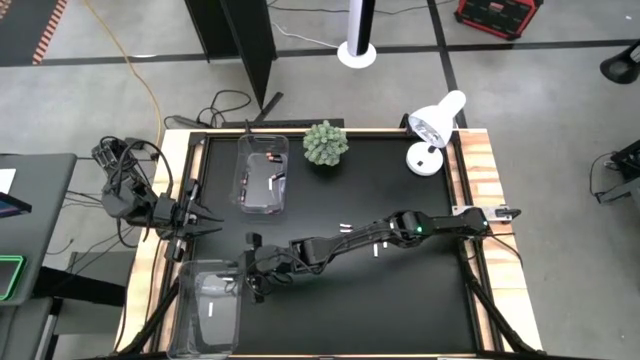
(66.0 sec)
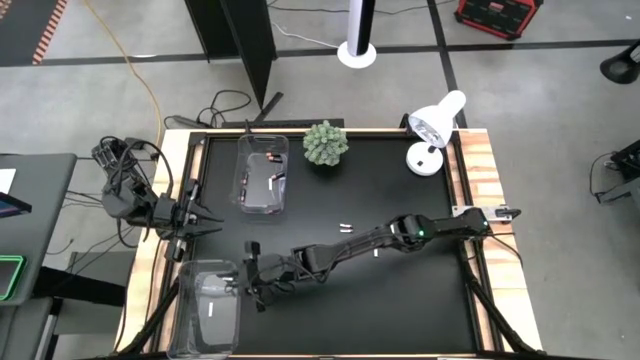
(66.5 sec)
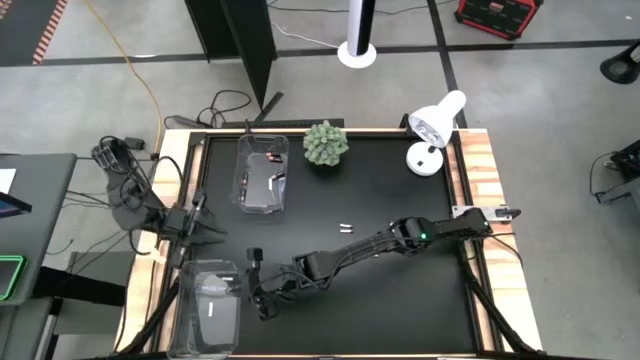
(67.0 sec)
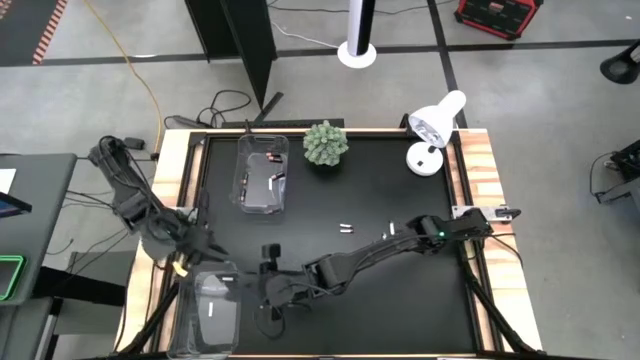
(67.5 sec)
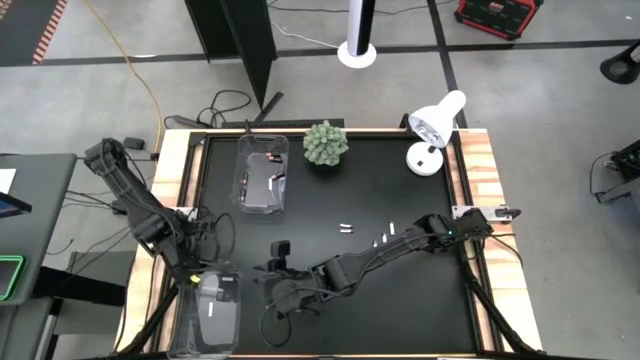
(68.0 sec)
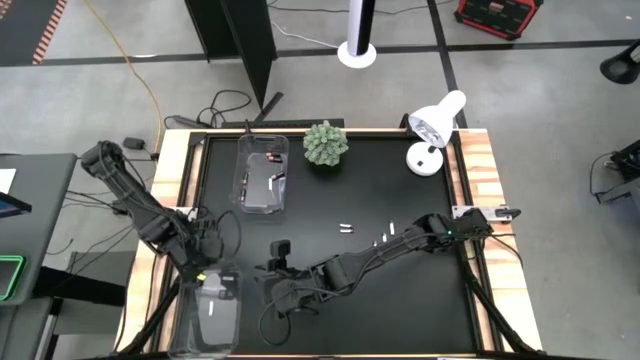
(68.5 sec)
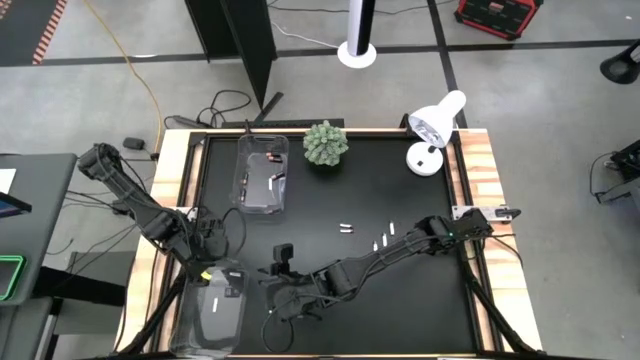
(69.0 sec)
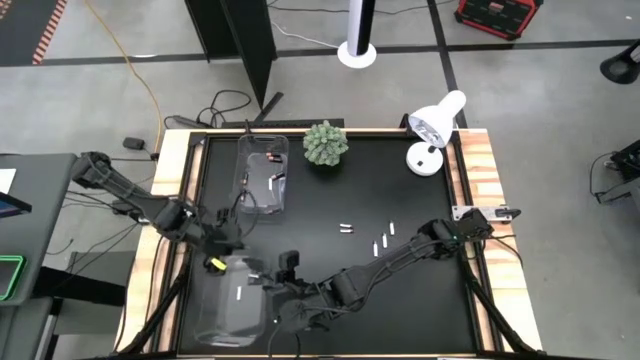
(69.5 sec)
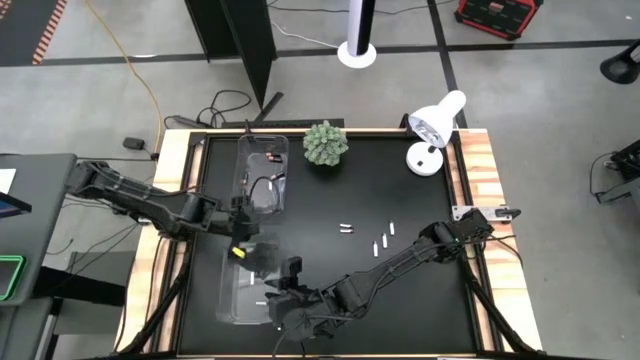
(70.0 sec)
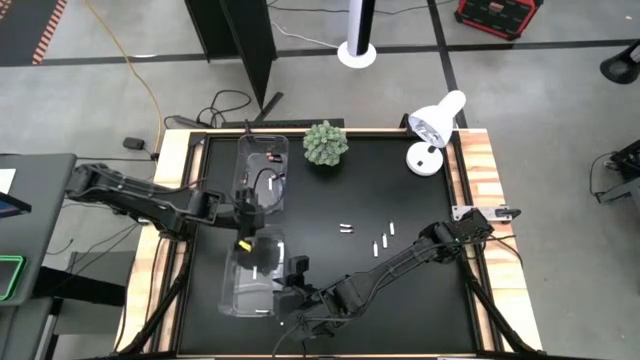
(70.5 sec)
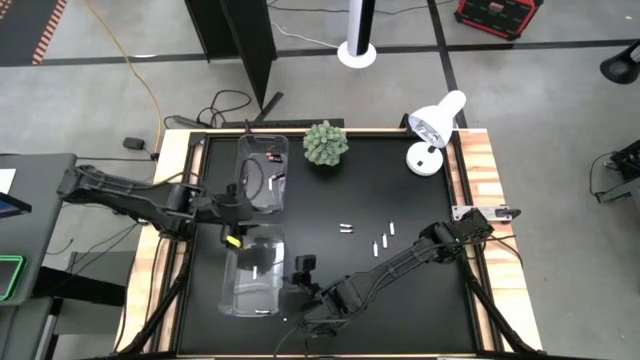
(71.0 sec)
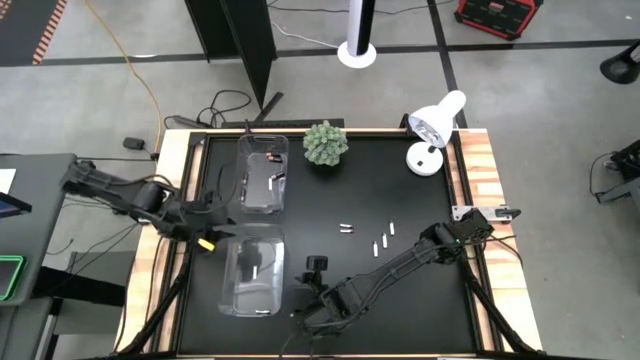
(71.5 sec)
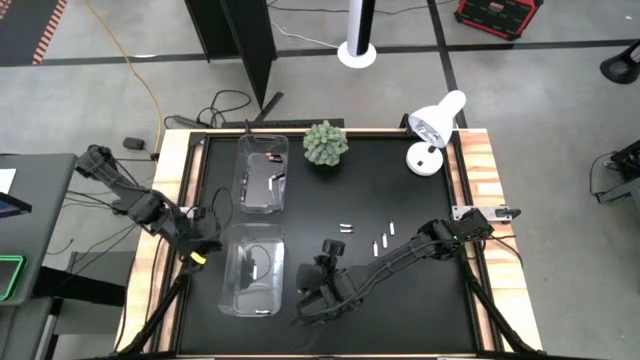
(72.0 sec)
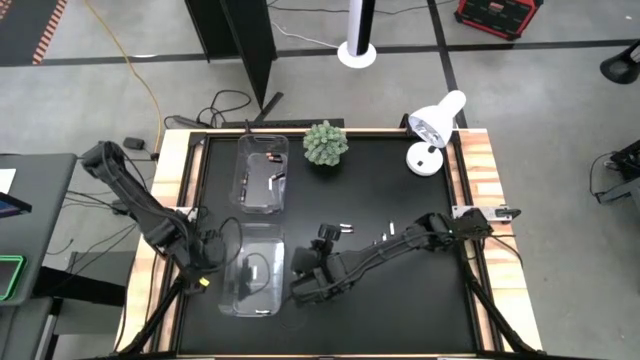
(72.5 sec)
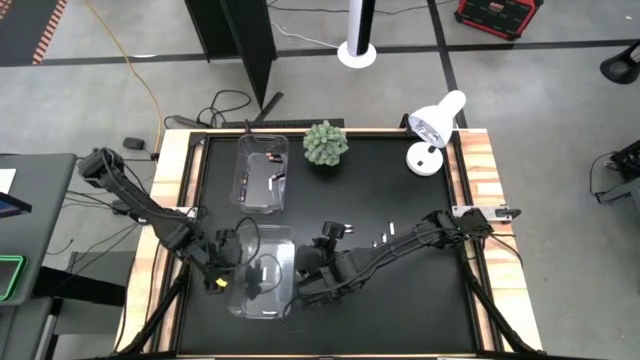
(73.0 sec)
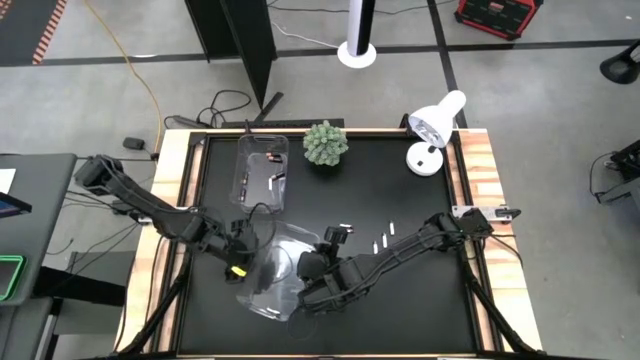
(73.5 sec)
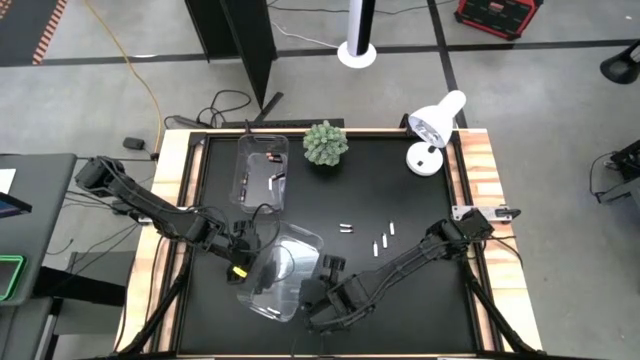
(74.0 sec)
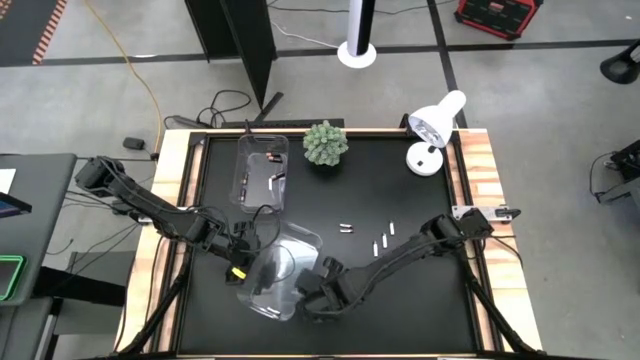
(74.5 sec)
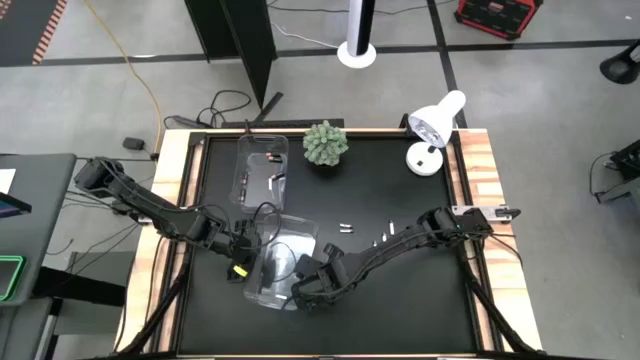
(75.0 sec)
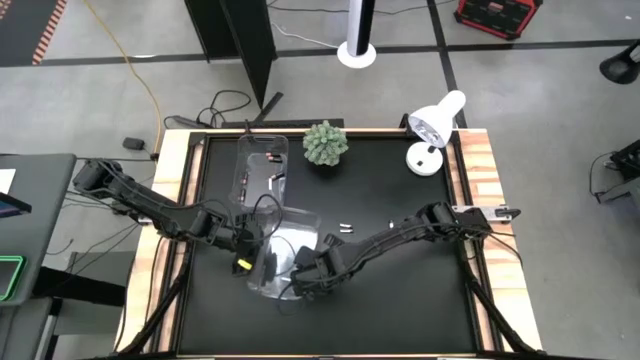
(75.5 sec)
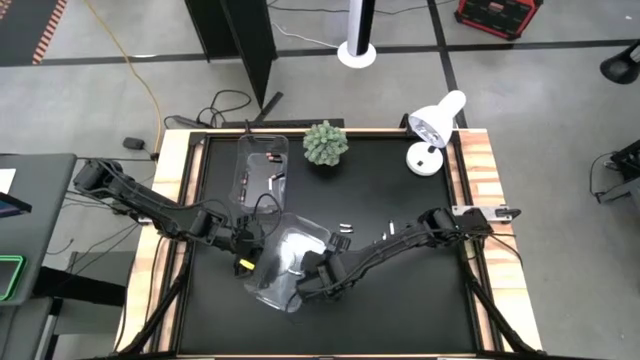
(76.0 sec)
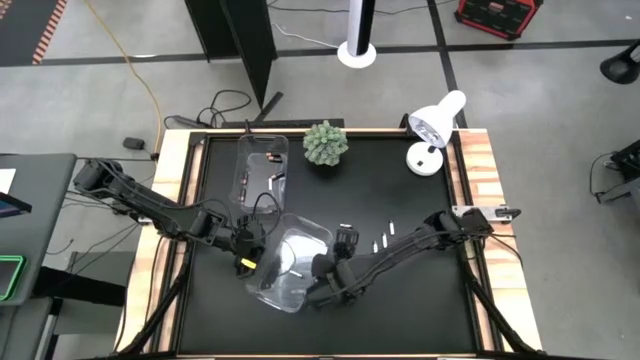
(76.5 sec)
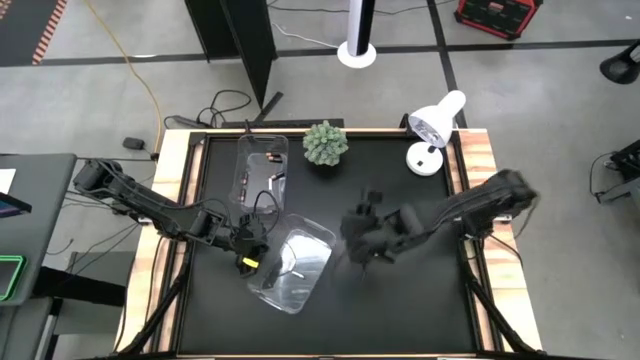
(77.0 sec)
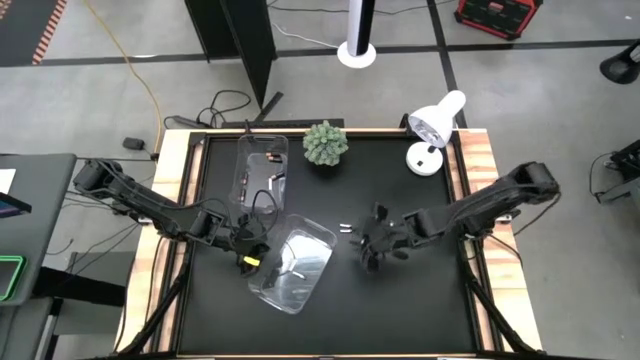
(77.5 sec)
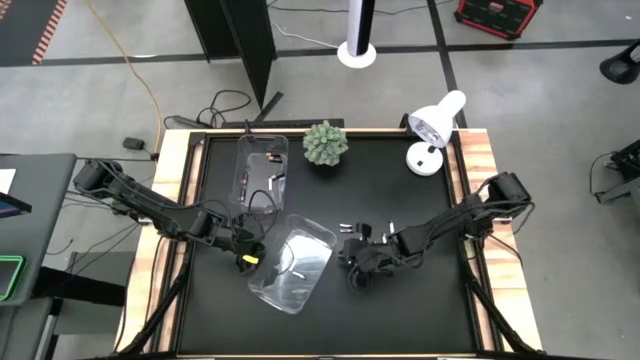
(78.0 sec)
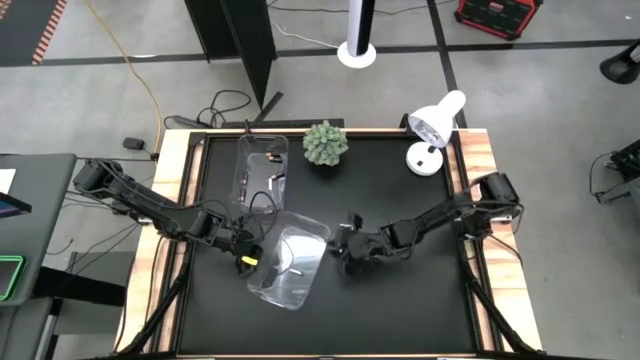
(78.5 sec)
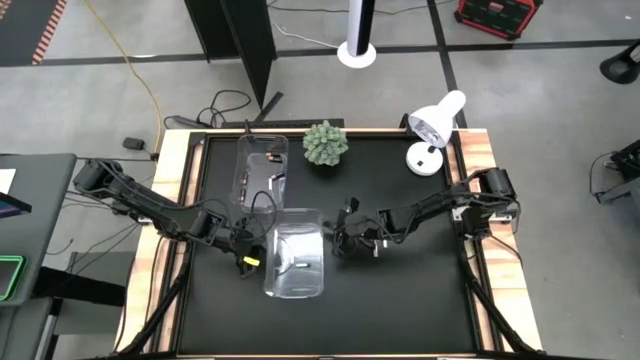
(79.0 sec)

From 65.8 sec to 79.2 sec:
Task: Sort batteries
Move the bottom transparent bin to the center of the table

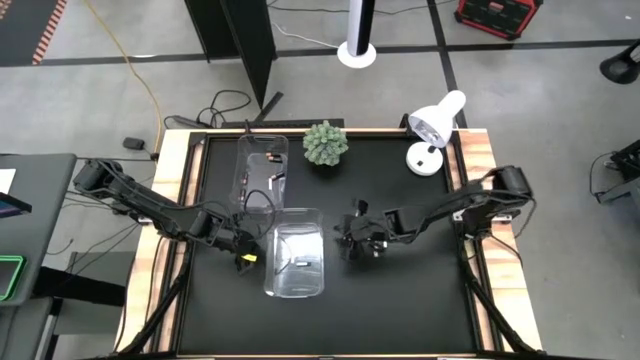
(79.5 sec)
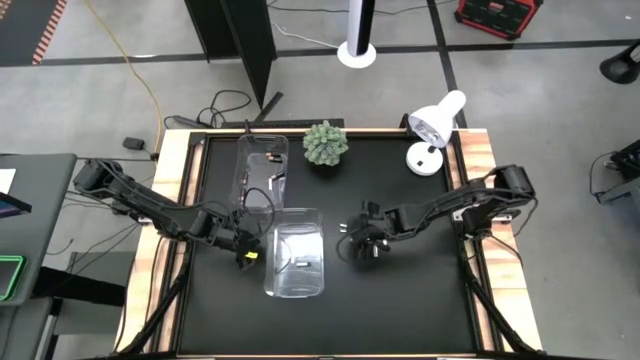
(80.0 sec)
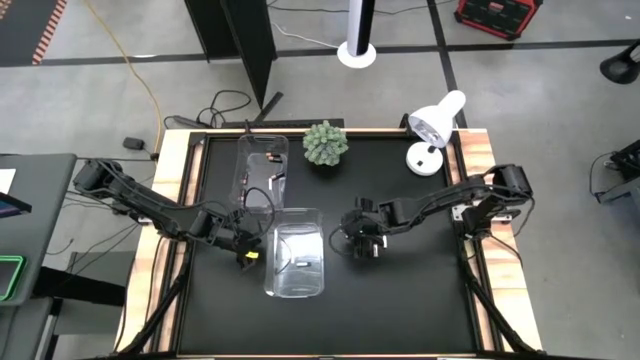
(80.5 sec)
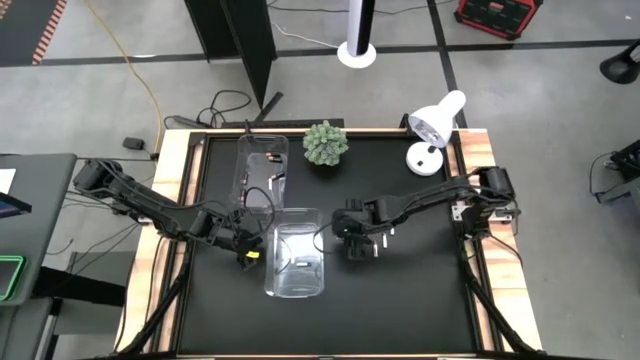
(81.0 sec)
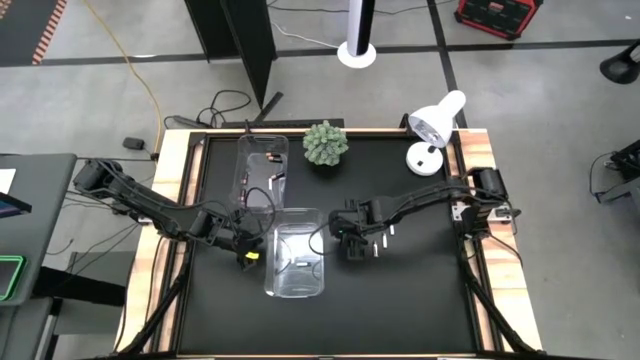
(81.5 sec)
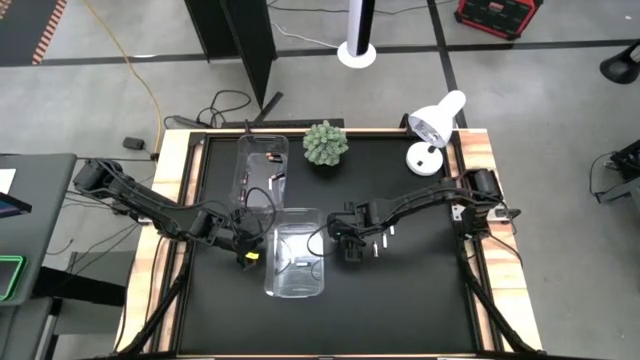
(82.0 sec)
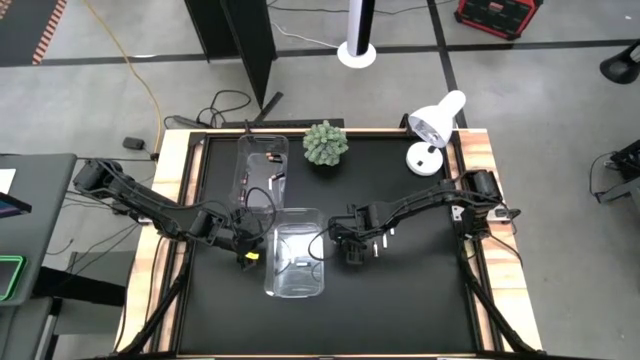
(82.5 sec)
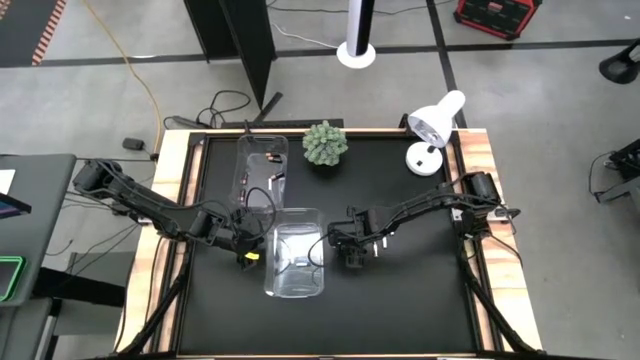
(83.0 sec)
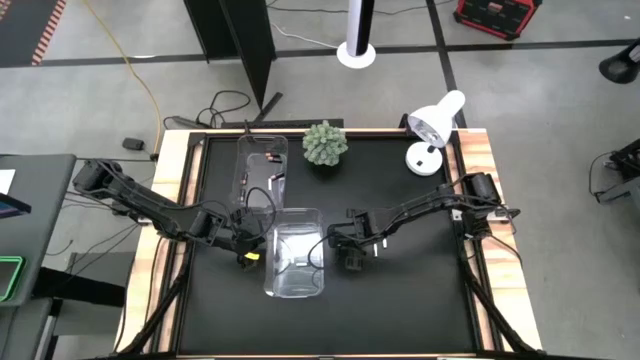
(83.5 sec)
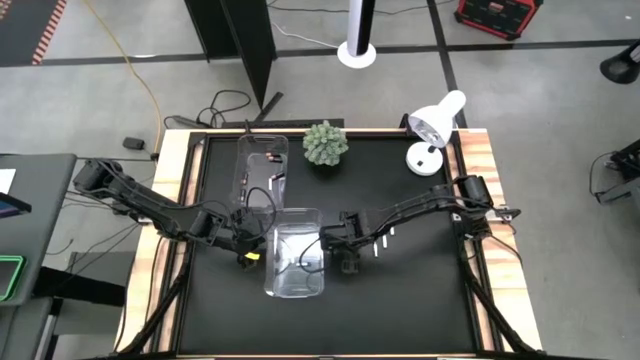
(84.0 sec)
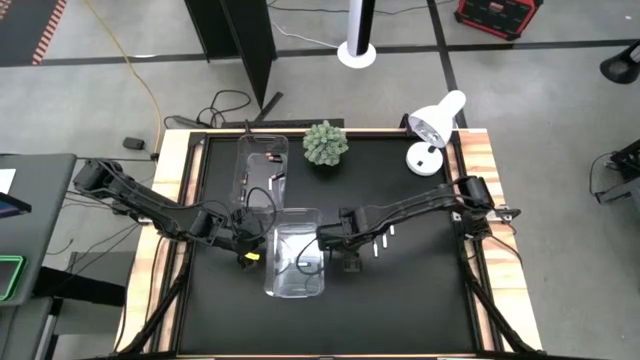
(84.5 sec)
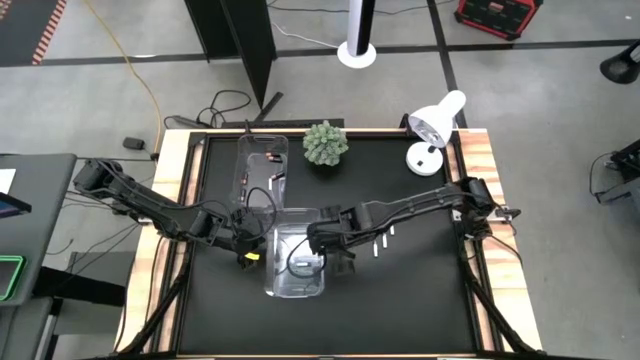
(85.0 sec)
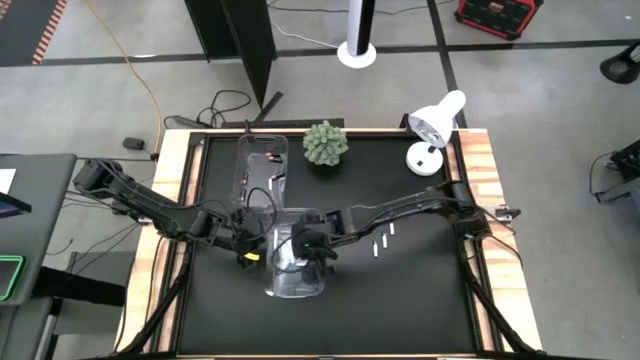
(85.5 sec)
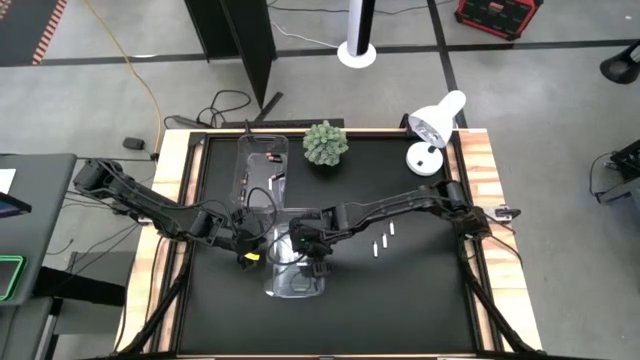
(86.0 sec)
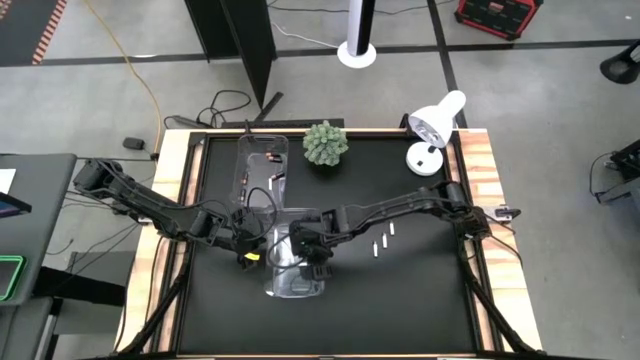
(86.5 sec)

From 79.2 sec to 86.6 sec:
Put the silver and black battery into the center transparent bin
